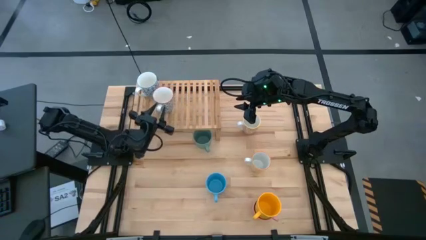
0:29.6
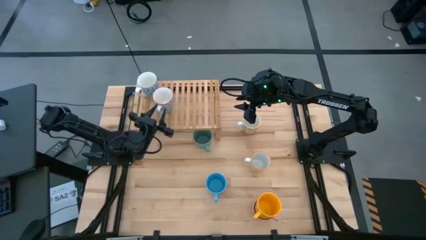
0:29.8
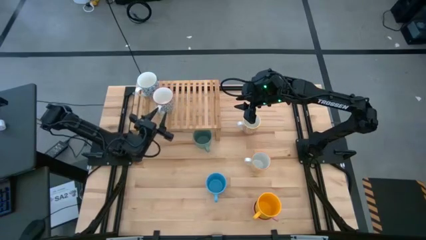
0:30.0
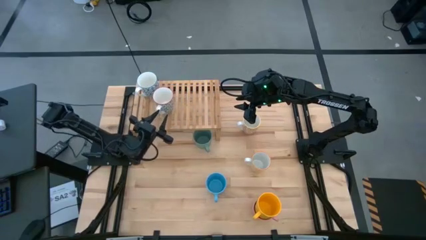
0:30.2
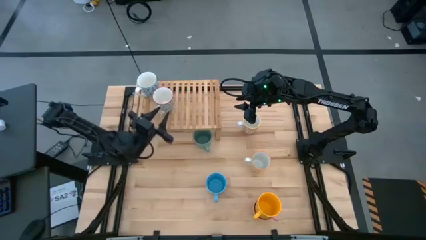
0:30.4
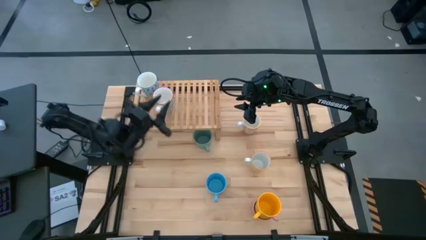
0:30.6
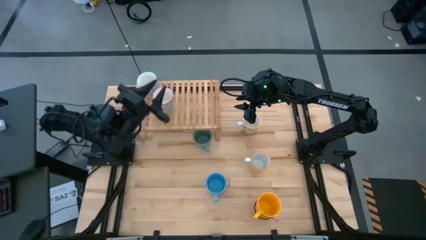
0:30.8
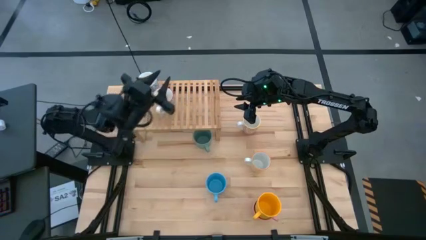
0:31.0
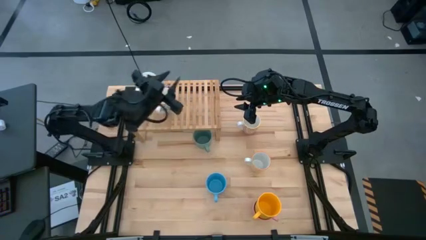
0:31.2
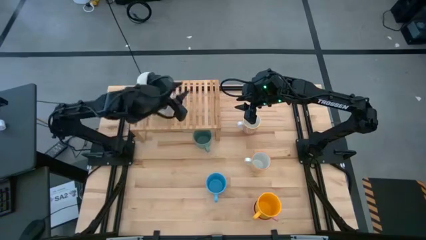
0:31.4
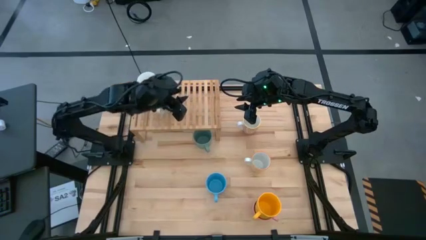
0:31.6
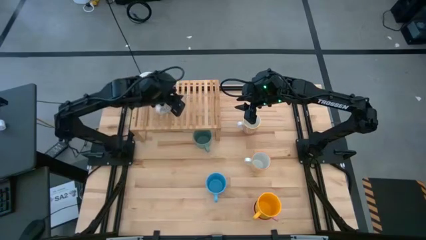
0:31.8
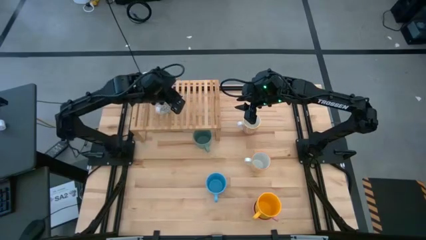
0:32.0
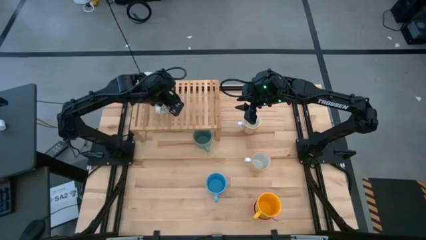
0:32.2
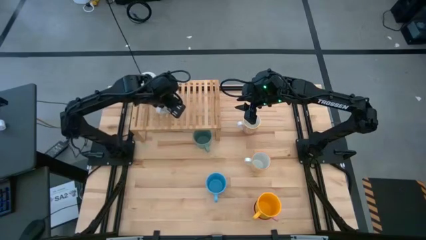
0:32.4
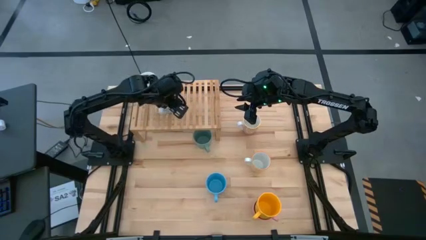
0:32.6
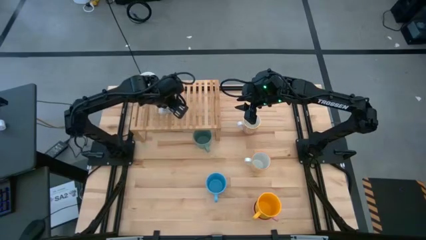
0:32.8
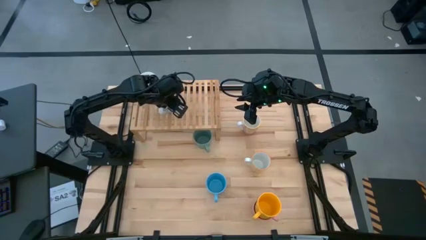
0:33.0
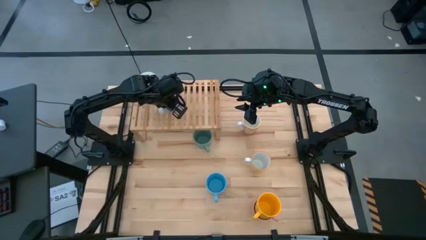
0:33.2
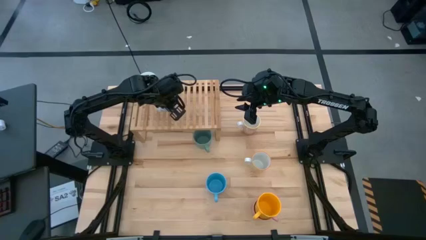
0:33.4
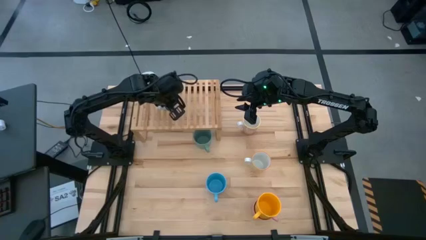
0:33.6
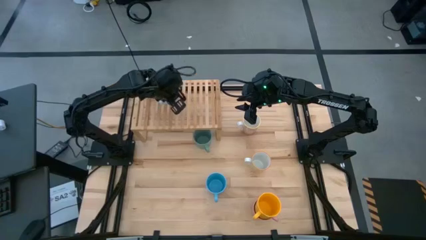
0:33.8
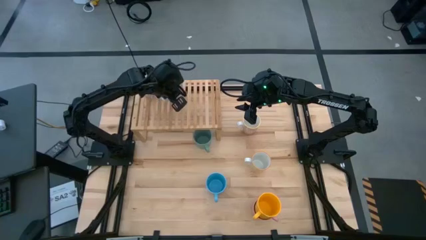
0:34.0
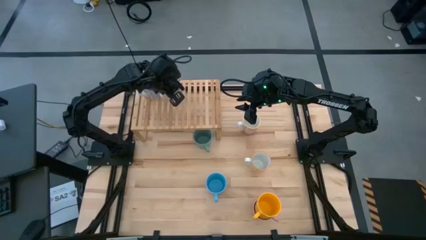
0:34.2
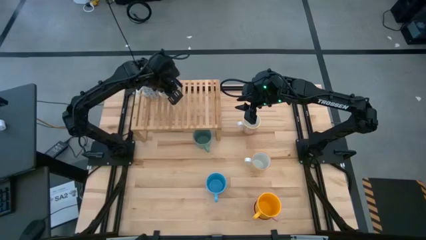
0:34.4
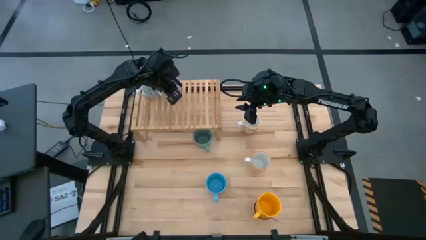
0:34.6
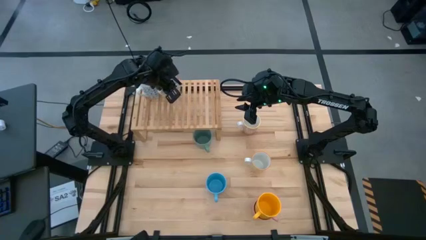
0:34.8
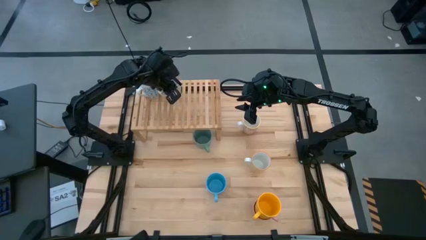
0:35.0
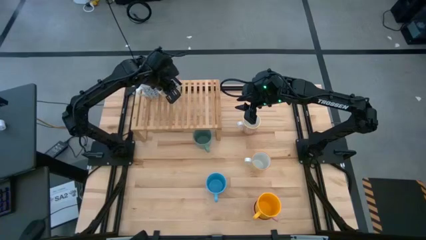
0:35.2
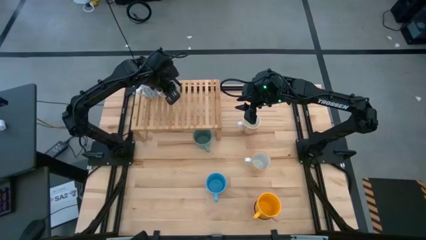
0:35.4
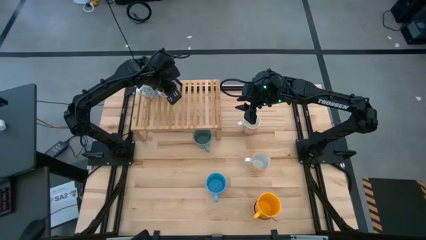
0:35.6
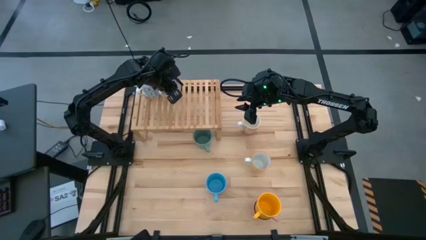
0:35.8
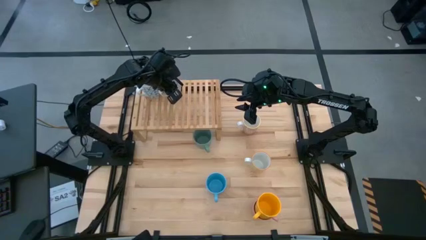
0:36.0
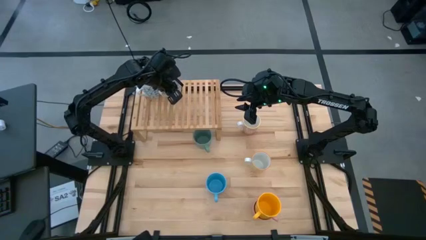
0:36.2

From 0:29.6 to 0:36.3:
Task: Place coffee mugs
Adjust the white-gray patterned mug on the shelf

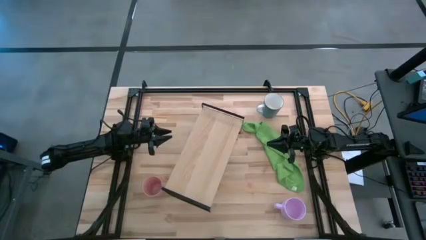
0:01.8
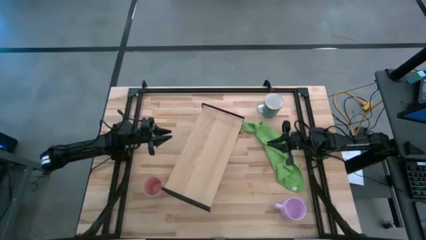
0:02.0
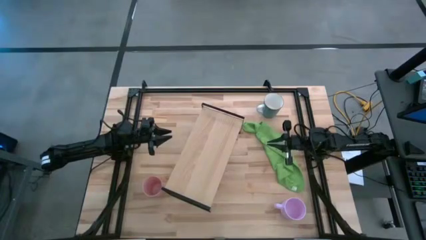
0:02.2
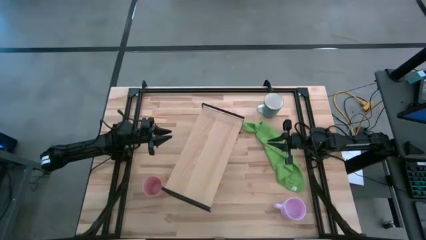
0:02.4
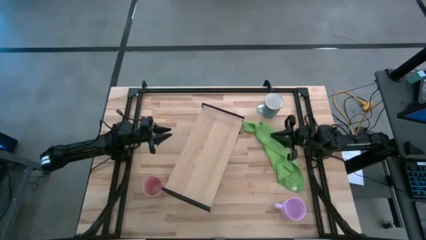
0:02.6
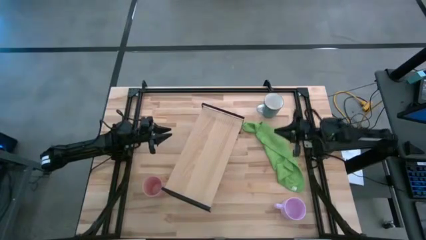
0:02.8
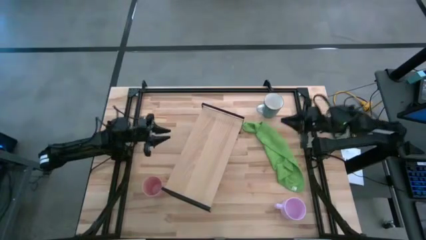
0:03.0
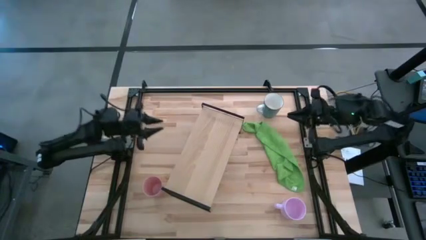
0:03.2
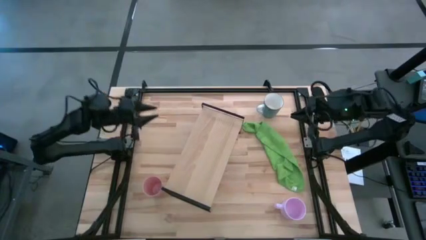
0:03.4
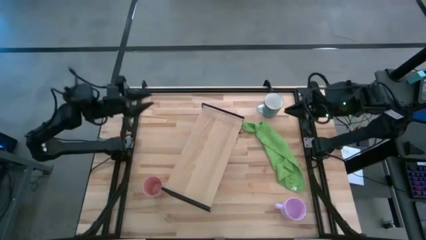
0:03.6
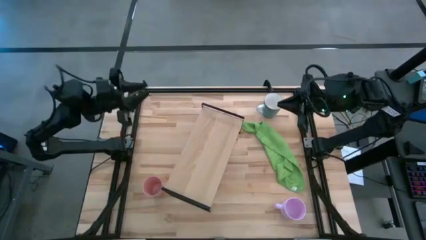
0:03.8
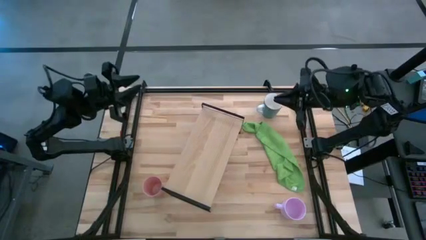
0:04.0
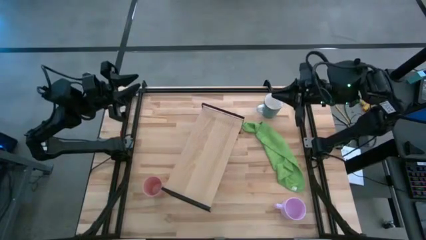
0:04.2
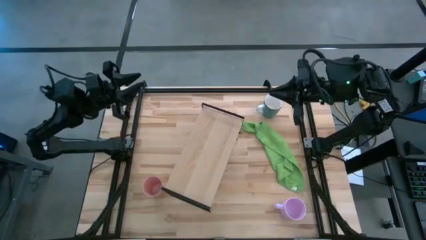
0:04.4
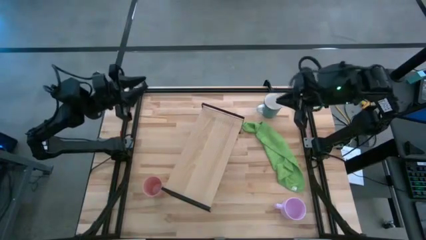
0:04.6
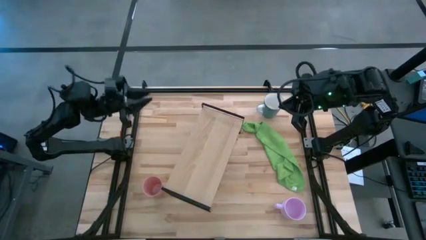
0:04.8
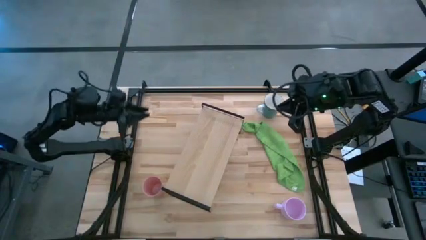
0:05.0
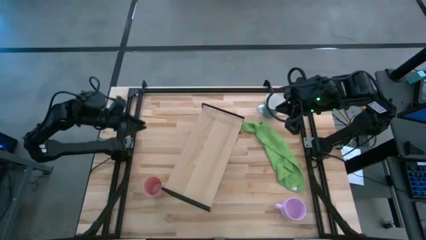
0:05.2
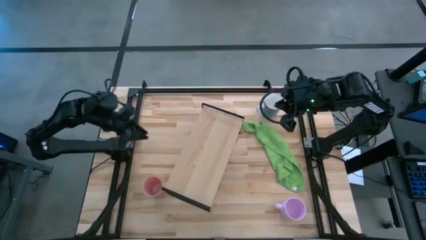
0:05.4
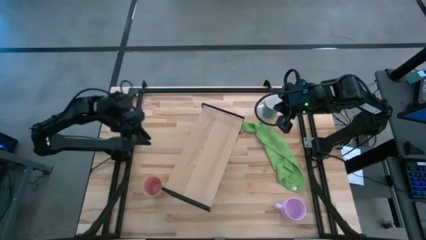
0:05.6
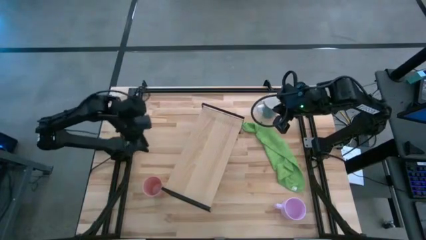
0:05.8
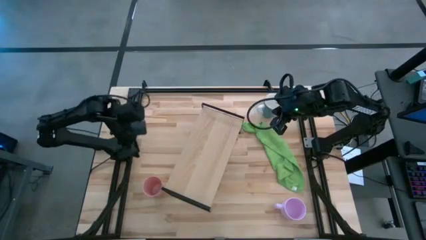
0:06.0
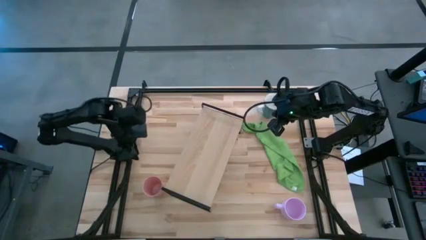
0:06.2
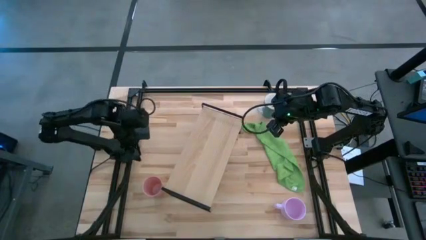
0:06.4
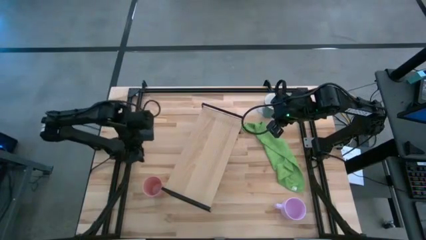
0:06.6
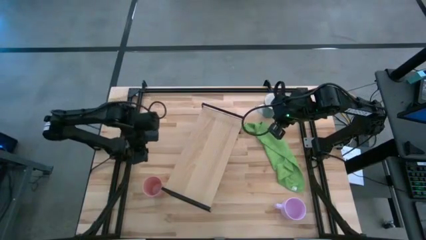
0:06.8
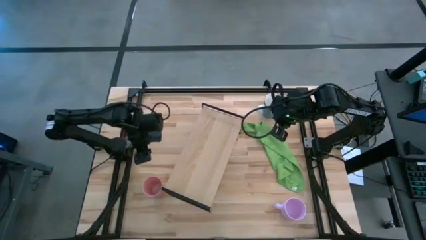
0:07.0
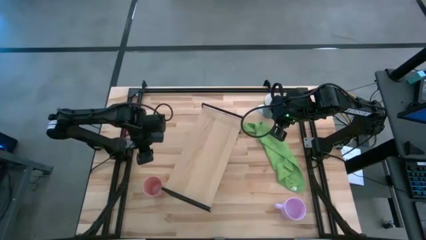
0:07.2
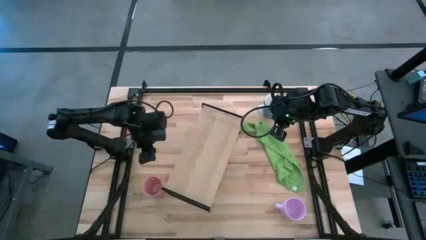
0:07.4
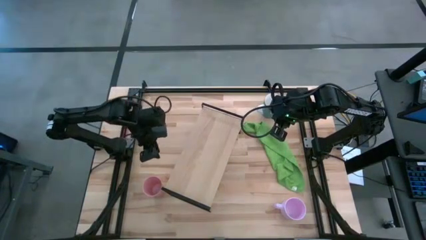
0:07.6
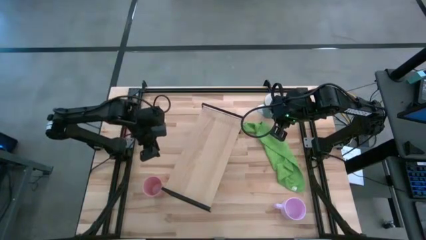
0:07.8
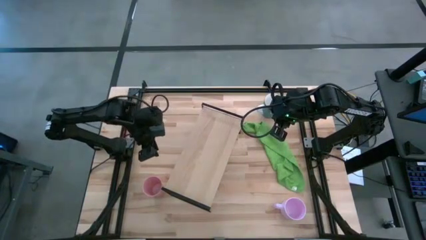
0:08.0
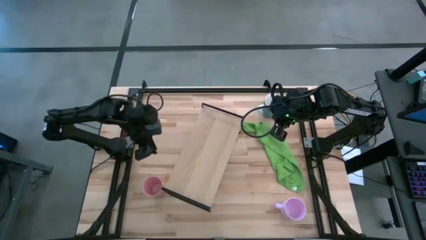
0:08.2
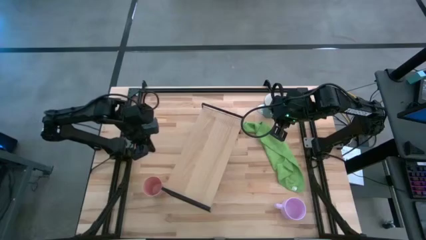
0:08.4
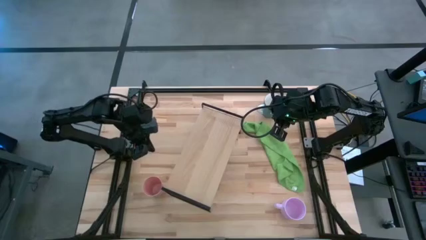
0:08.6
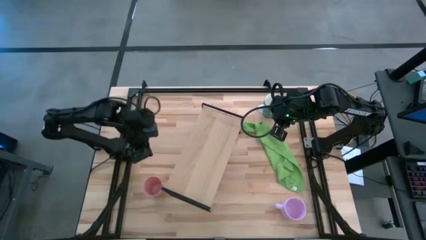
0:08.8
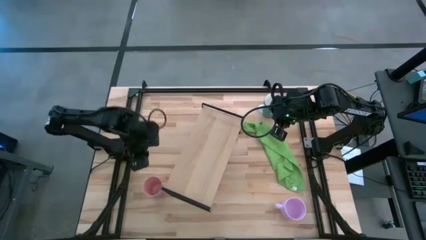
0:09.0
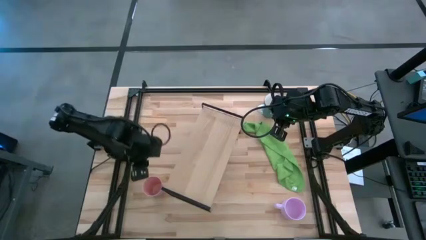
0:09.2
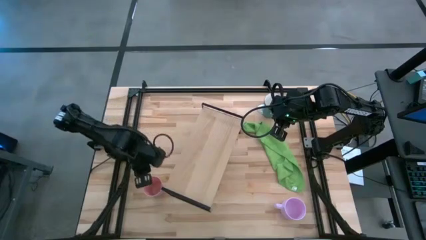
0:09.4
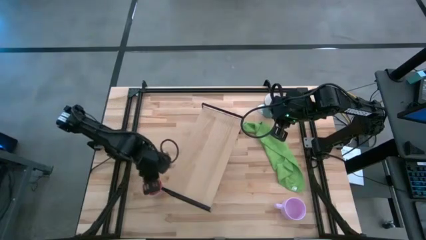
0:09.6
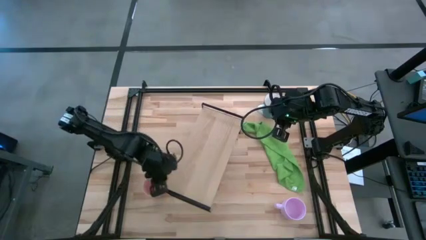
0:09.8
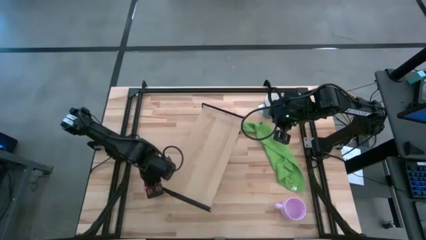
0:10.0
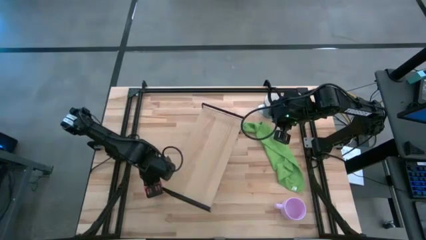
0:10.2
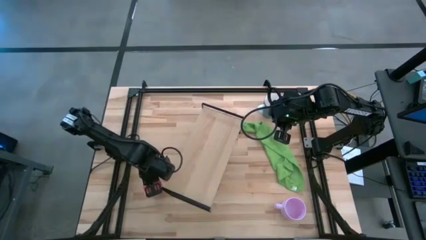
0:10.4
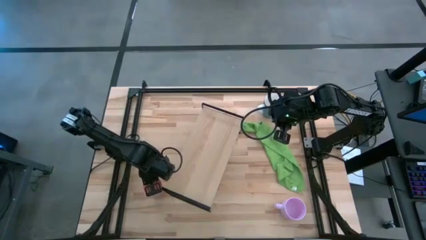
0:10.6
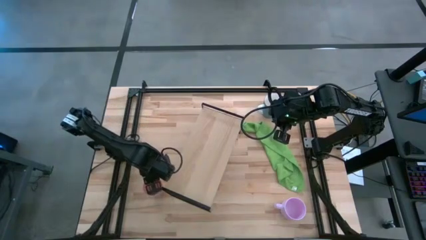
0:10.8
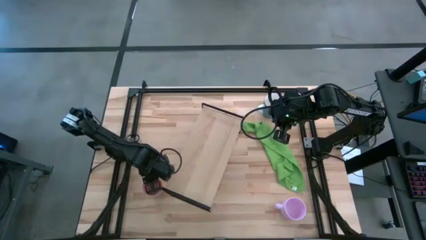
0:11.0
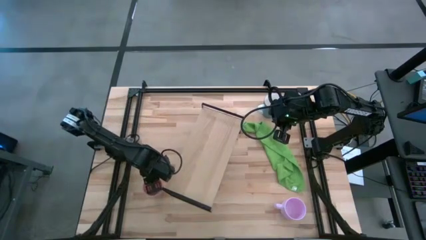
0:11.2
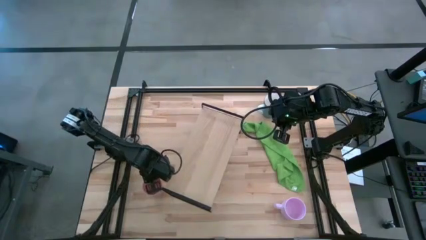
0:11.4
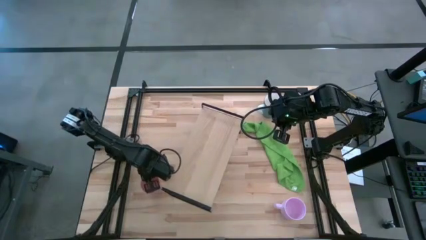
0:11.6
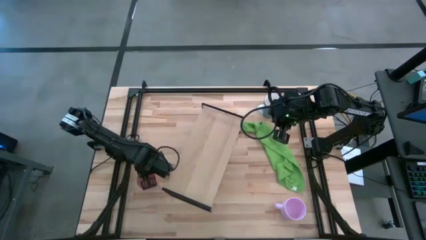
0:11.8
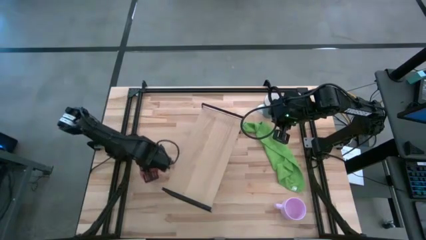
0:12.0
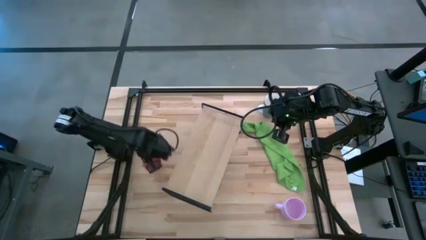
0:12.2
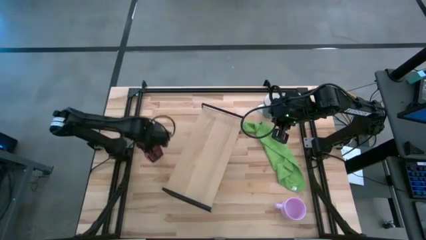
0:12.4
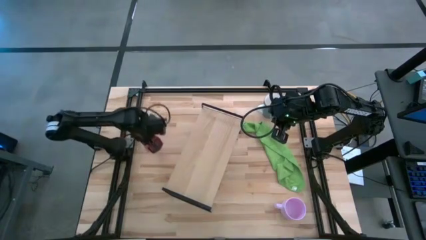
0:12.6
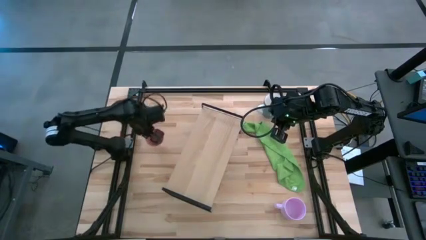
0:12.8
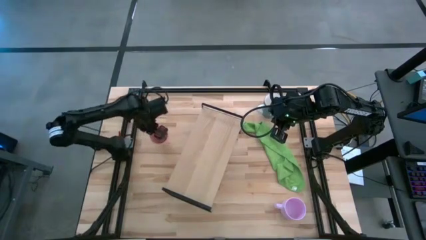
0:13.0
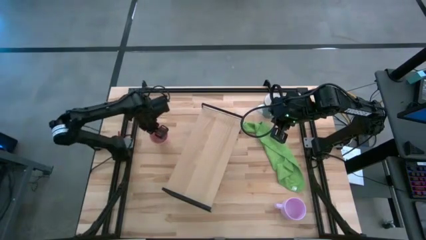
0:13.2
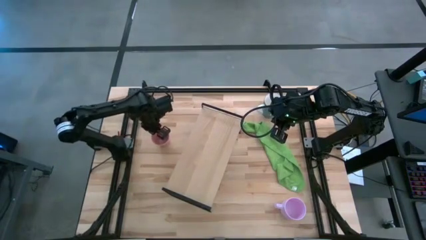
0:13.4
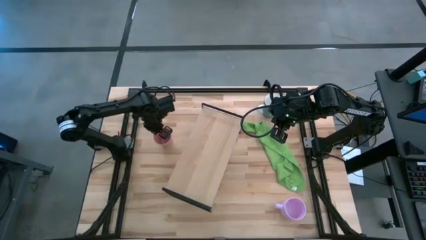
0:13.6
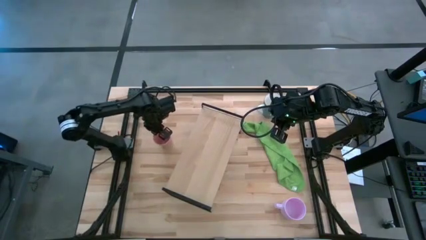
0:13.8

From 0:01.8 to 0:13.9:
Task: Stack small to large cups/mugs on shelf
Move the pink cup on the shelf
